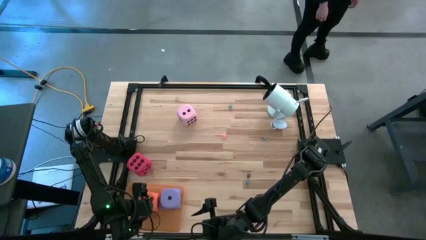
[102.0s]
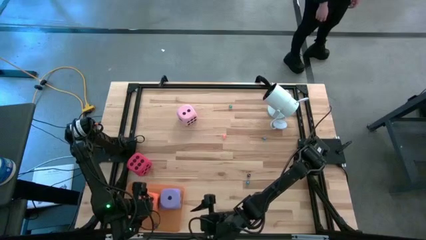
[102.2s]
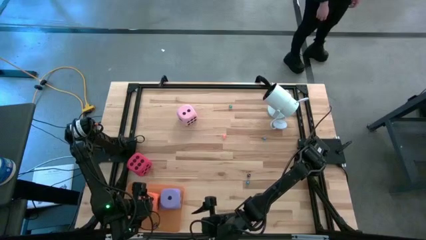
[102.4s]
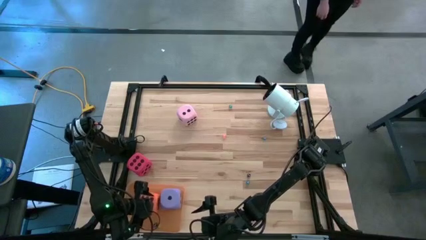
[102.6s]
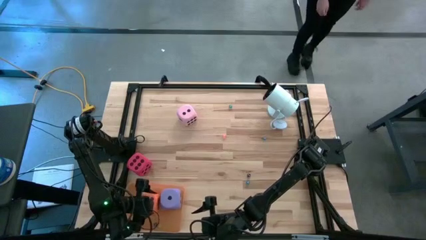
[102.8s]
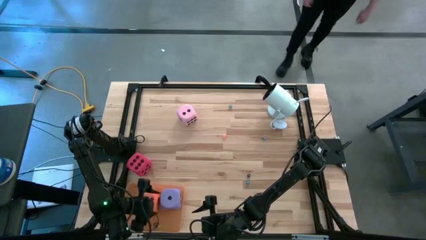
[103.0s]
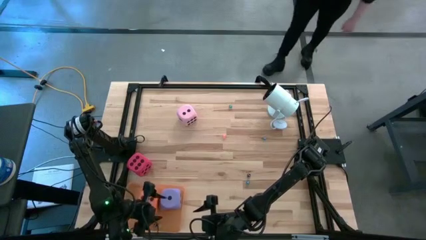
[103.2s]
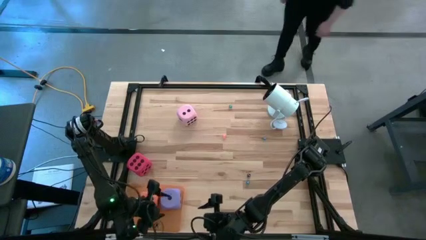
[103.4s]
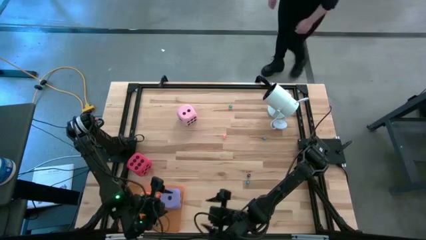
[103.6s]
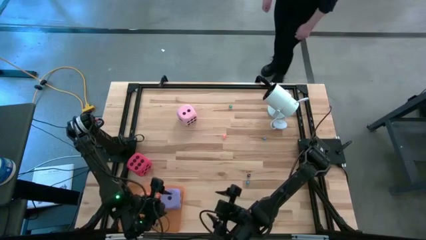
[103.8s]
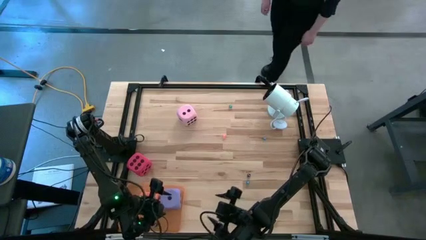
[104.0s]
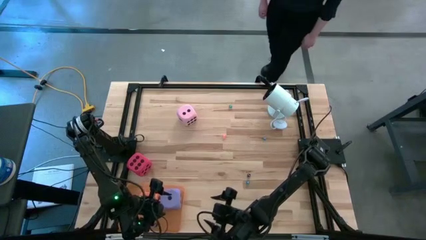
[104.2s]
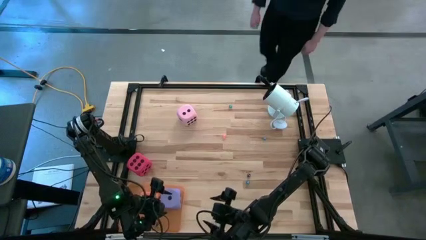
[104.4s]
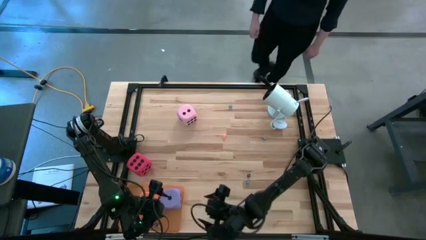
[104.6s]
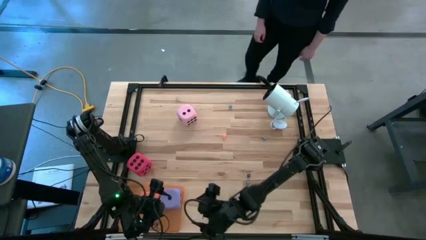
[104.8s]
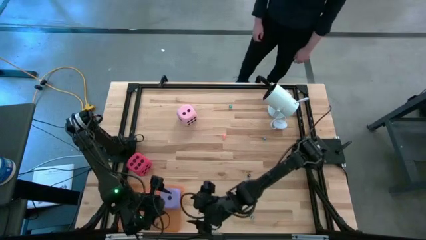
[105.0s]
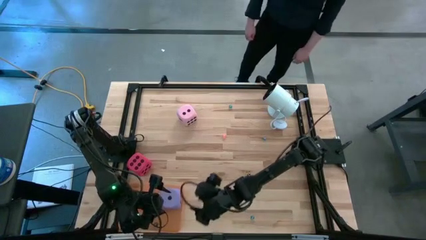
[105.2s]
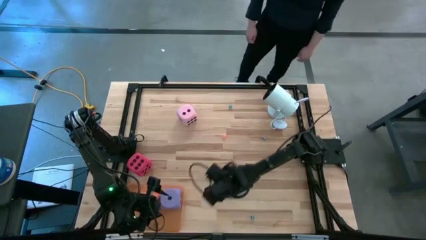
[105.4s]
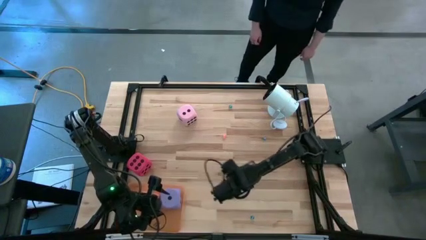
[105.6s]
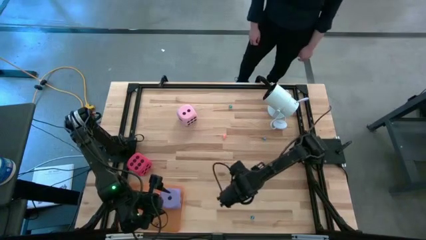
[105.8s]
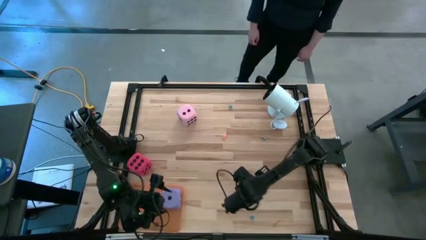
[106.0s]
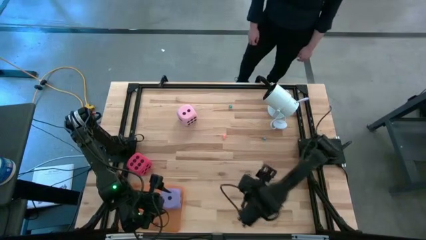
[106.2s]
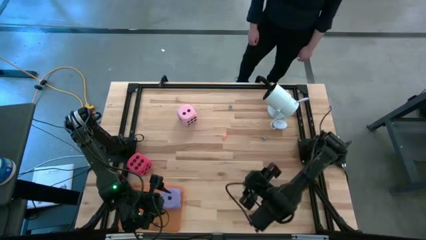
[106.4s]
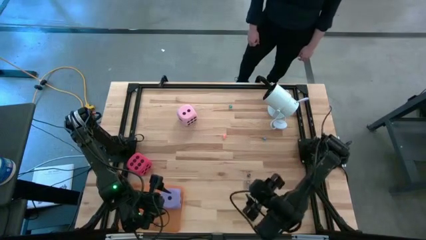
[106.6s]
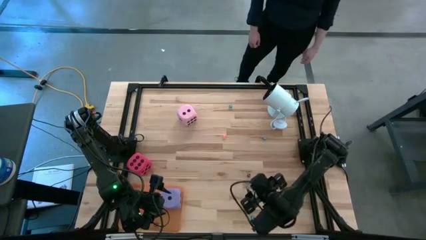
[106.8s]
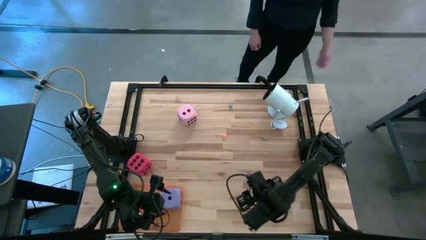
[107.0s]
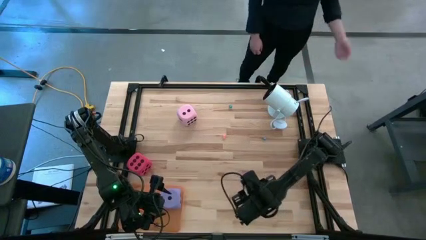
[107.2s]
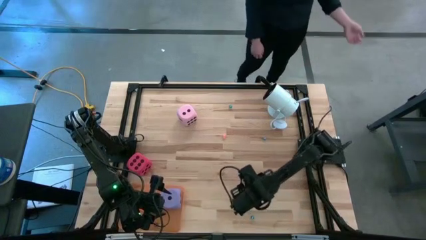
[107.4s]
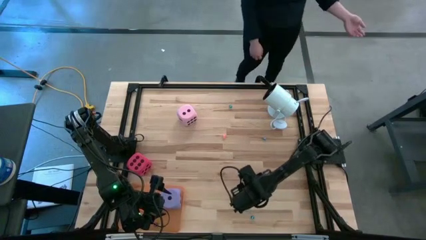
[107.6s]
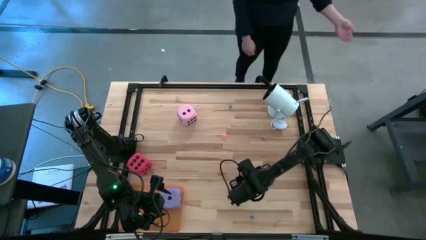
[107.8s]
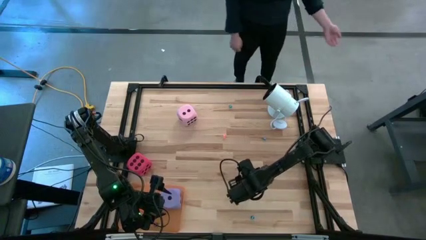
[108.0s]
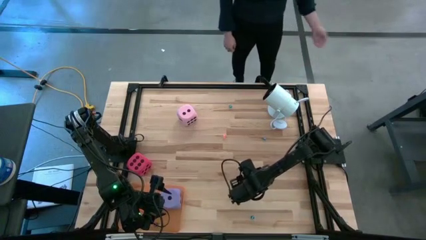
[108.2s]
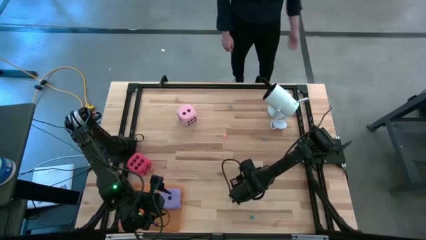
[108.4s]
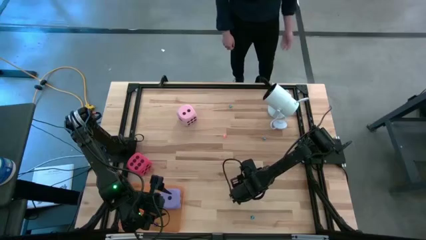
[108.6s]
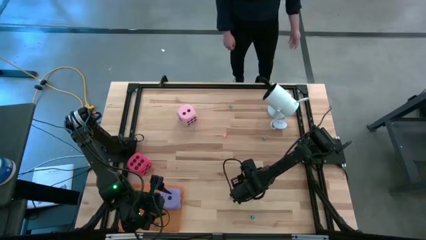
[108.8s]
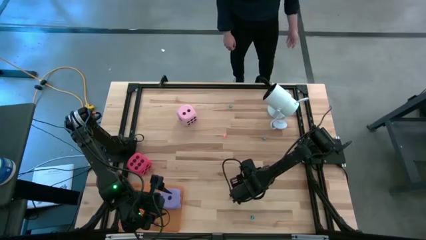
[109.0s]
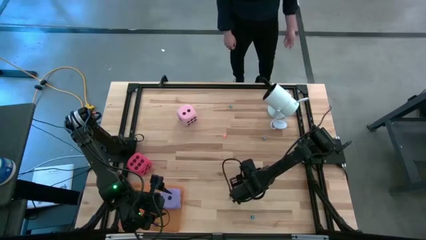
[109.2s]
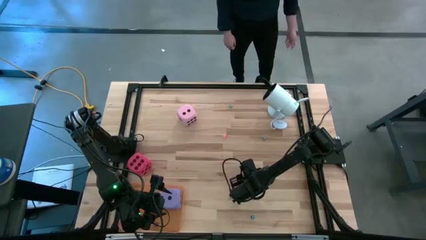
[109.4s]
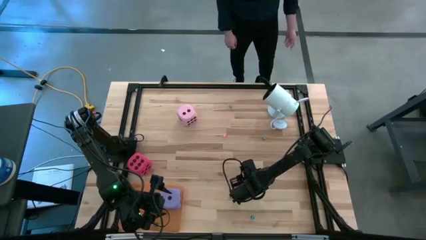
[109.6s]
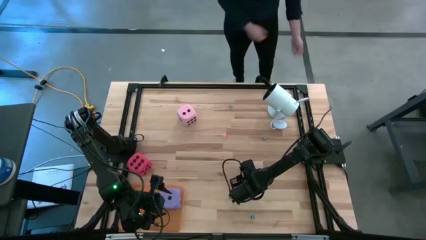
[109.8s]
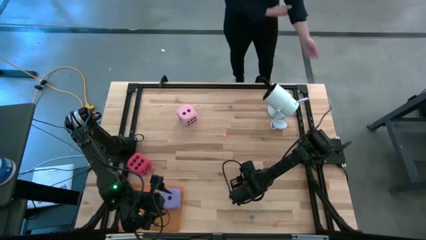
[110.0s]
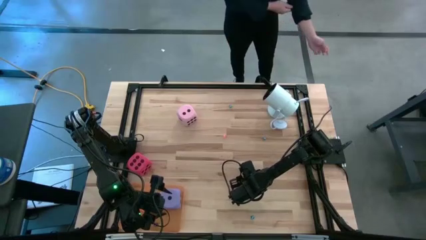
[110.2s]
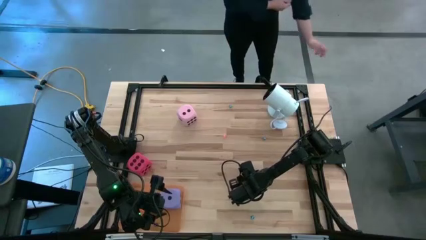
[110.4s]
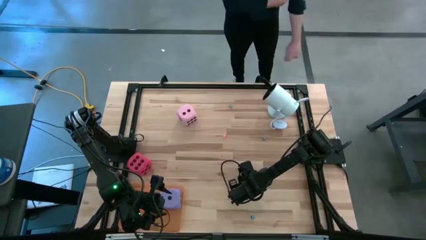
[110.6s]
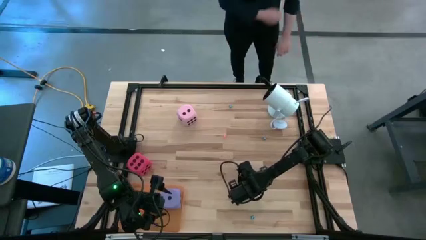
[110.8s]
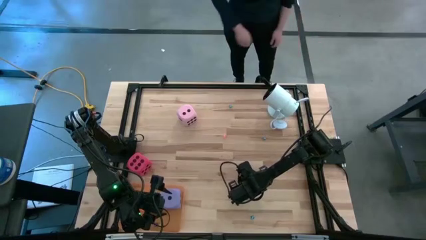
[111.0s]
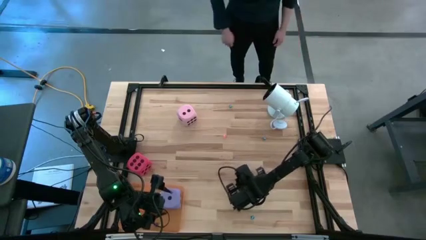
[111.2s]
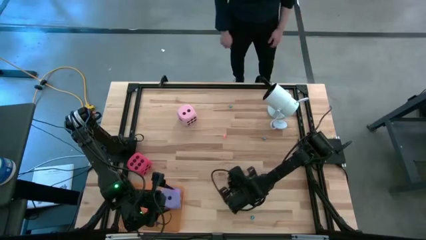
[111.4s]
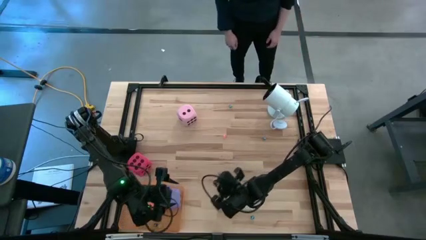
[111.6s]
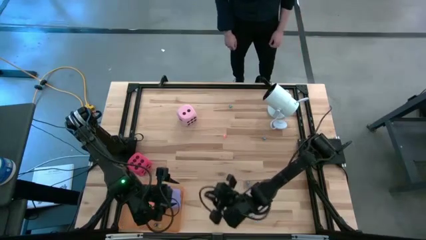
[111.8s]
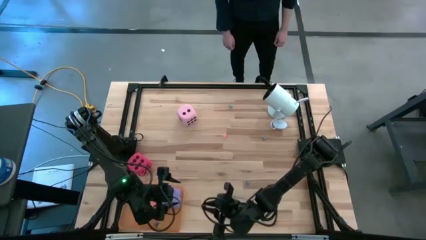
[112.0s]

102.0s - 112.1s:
Task: Pick & Place Dice
Put the small black dice into the orange bin

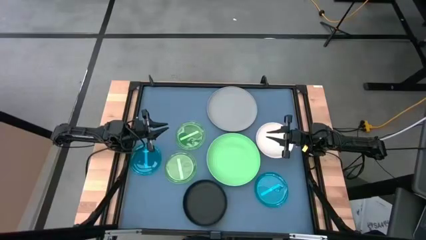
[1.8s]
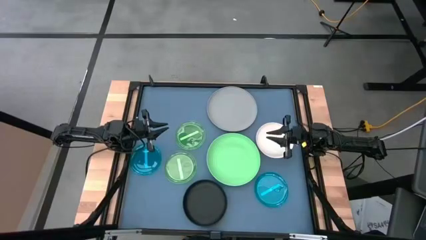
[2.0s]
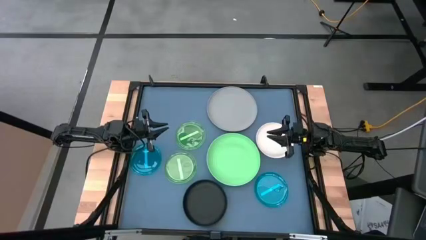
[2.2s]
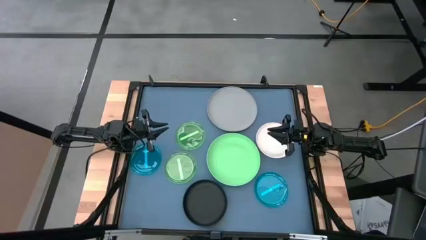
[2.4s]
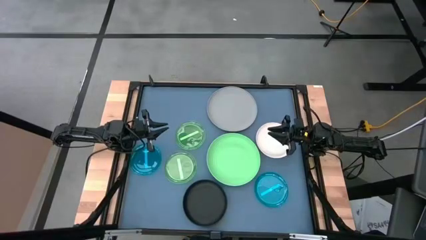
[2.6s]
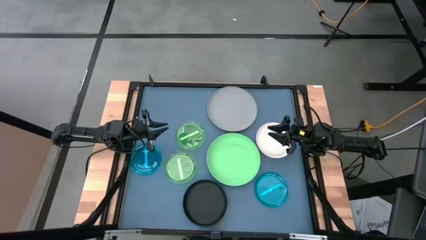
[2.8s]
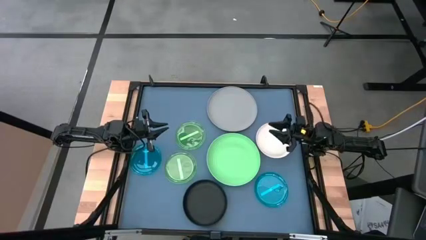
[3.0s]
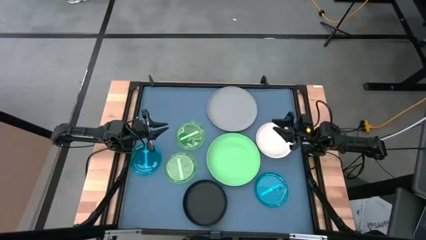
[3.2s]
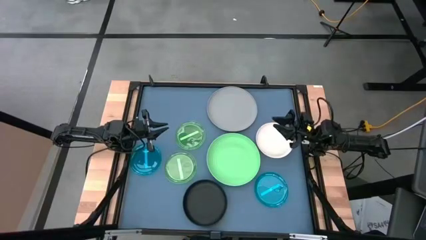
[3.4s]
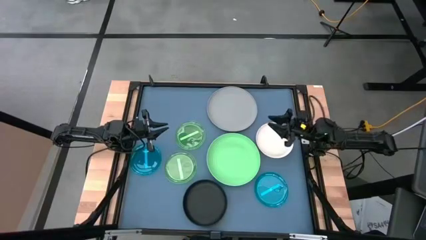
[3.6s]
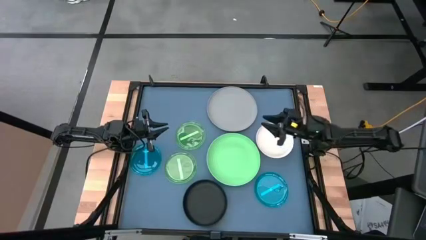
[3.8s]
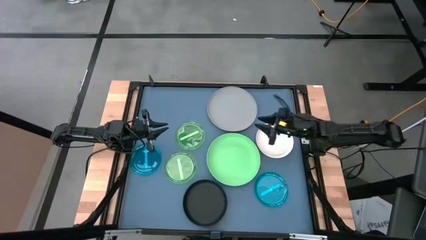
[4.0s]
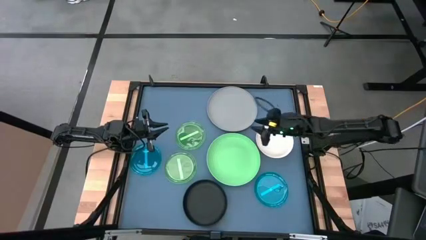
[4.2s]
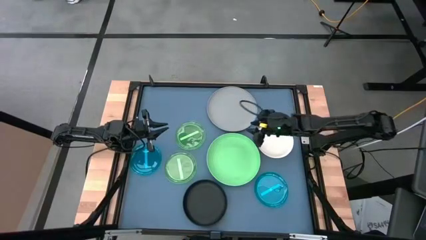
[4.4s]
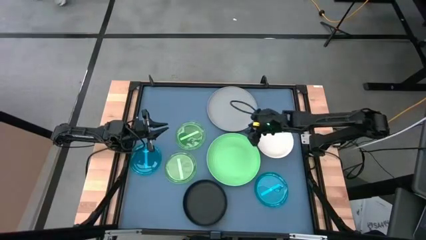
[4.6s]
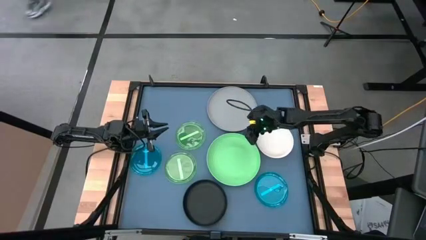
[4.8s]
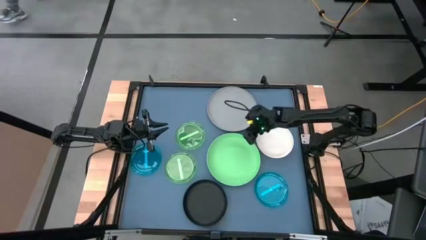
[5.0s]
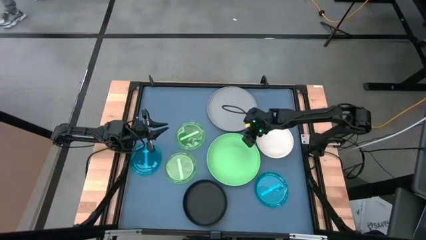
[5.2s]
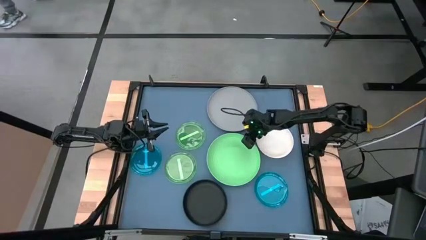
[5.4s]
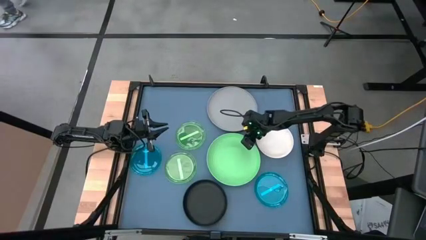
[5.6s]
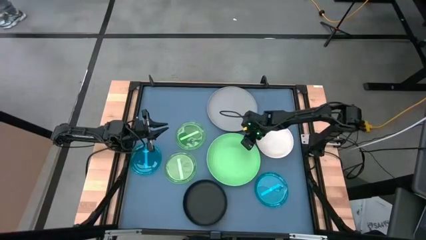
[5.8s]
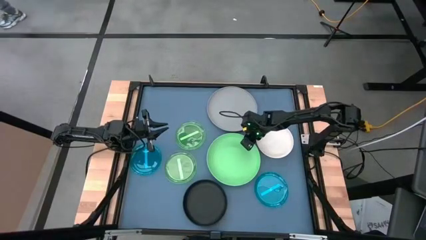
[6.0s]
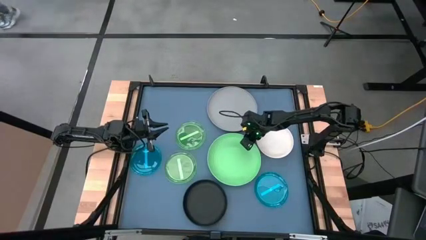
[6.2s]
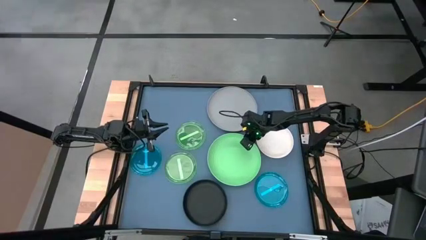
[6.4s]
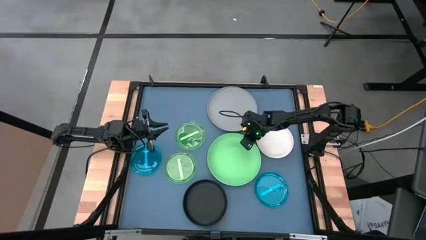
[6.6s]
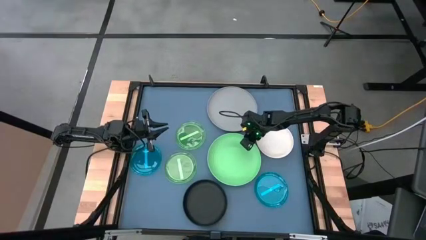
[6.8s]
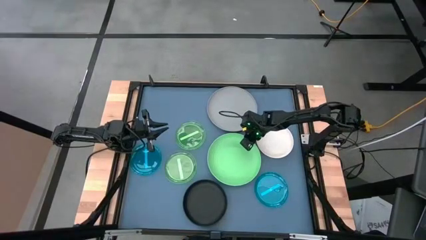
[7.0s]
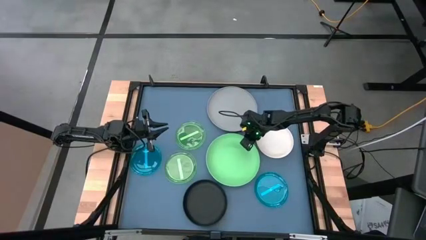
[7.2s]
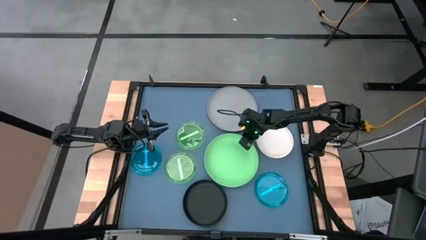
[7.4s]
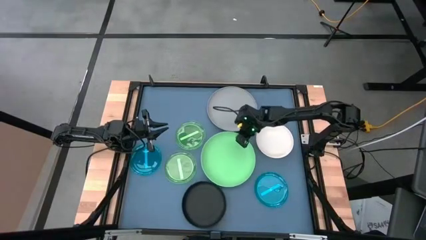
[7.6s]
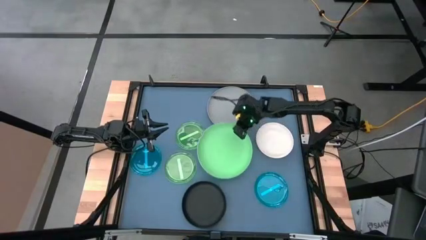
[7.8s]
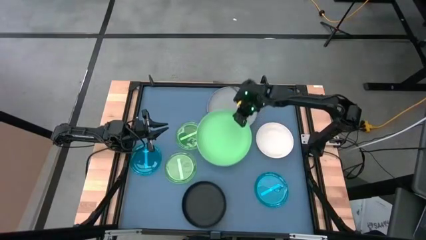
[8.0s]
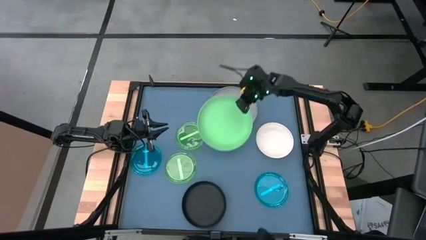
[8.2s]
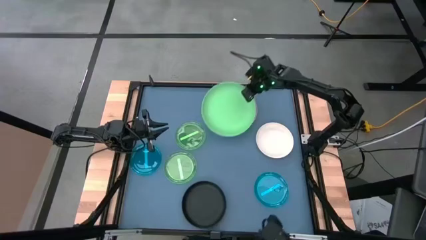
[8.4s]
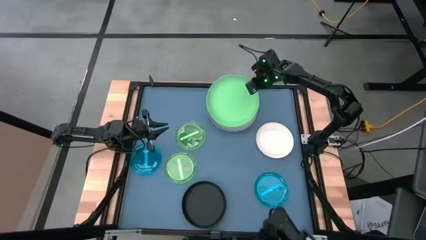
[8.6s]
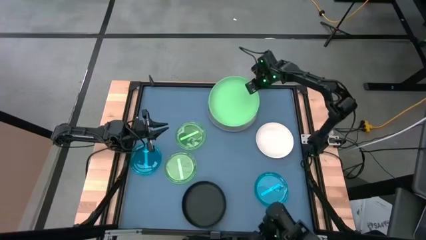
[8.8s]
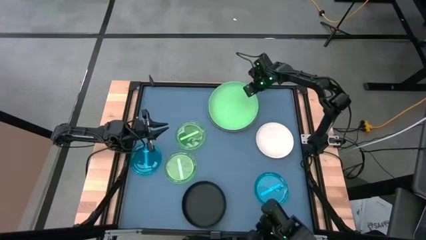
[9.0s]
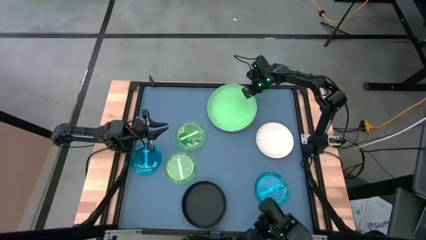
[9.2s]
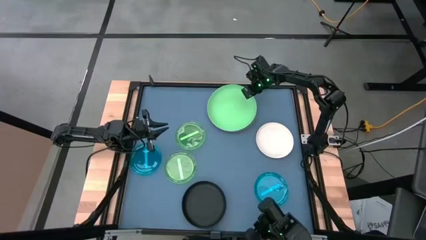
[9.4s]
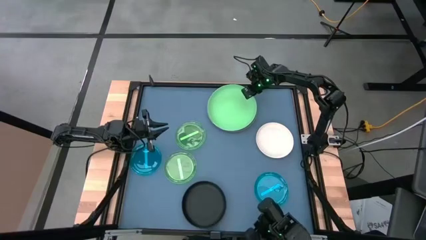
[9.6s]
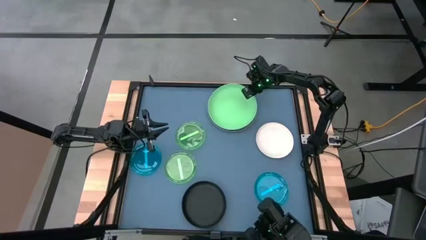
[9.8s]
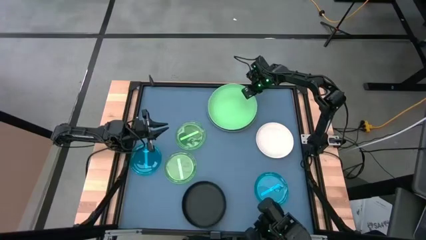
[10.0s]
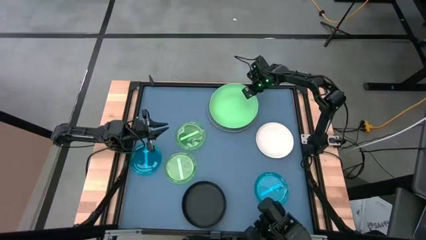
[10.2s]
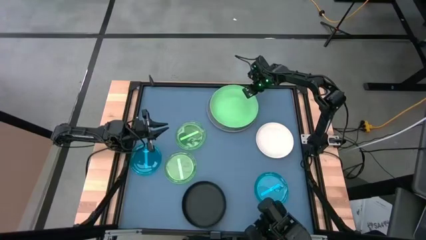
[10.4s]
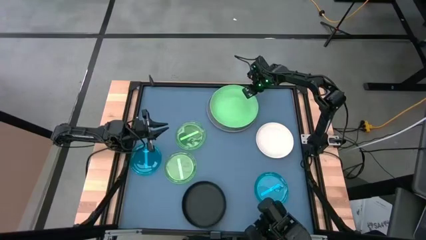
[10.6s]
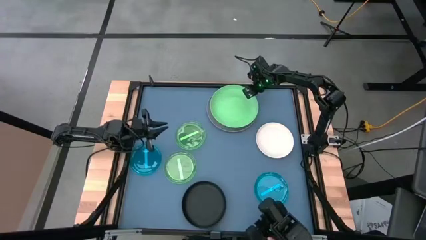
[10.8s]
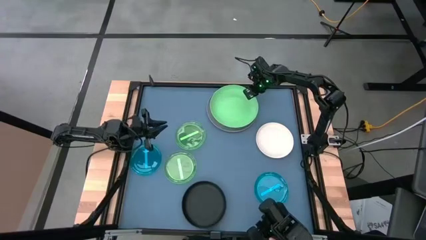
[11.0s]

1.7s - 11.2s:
Task: Stack plastic plates
Stack the large green plate on the large gray plate
